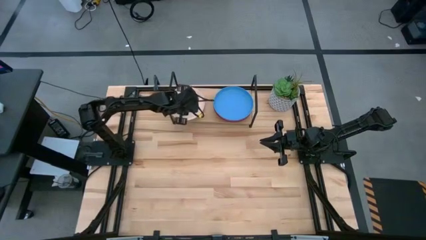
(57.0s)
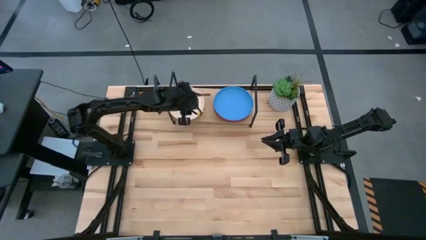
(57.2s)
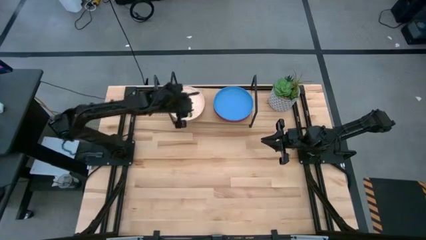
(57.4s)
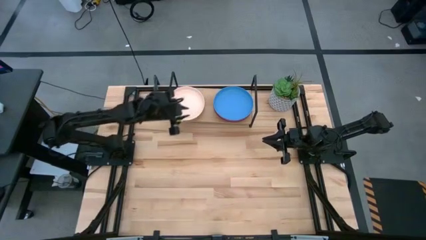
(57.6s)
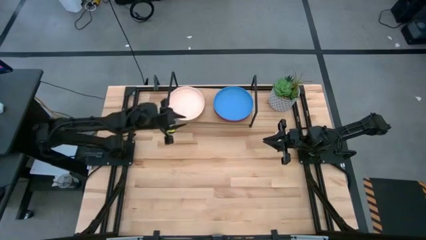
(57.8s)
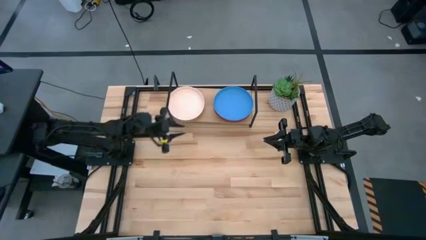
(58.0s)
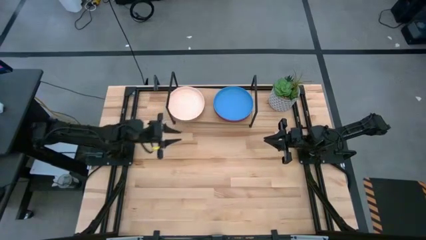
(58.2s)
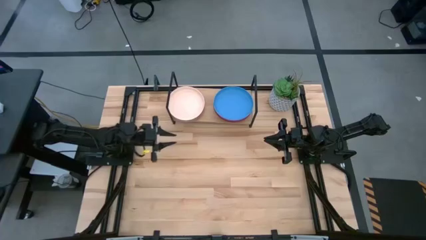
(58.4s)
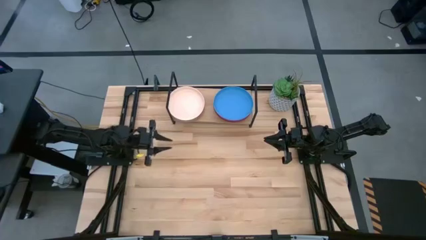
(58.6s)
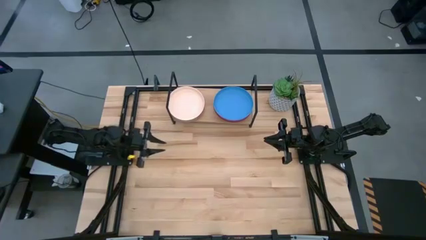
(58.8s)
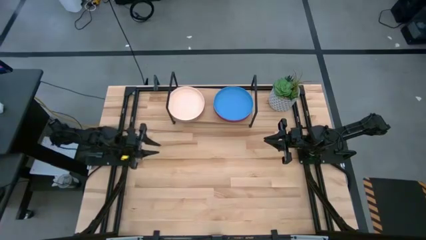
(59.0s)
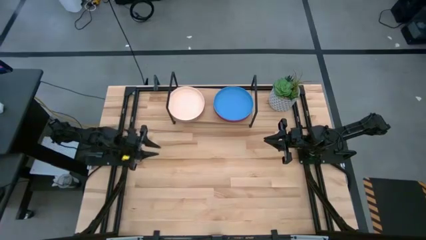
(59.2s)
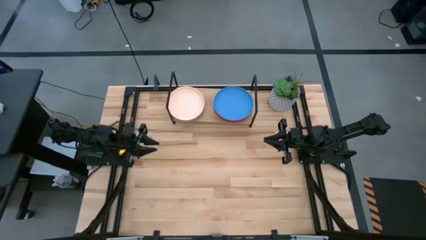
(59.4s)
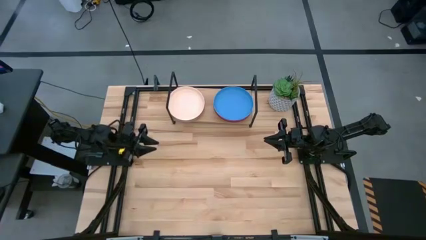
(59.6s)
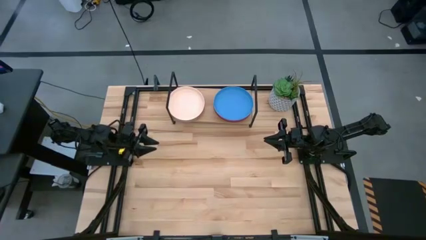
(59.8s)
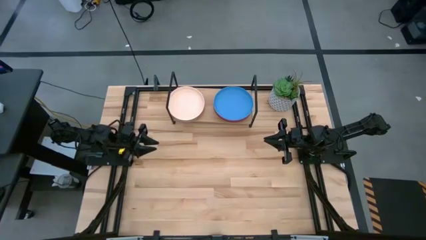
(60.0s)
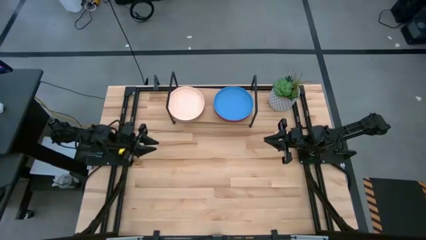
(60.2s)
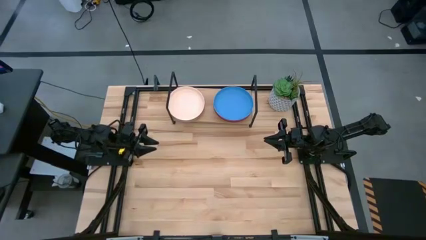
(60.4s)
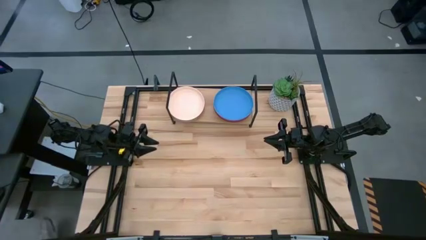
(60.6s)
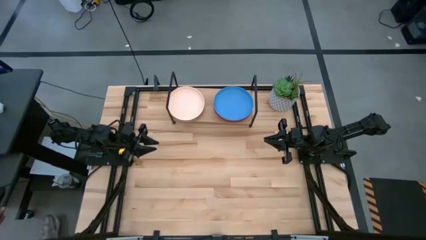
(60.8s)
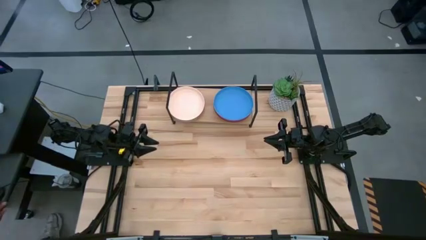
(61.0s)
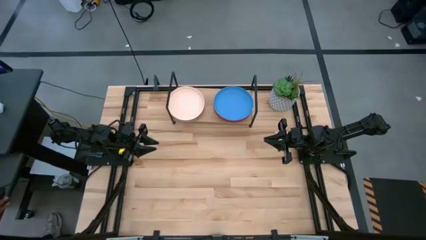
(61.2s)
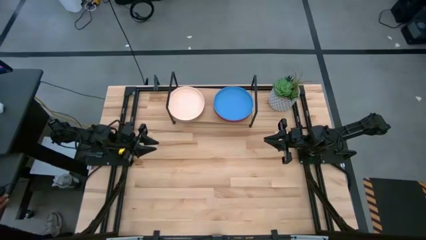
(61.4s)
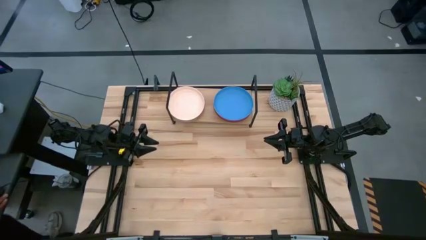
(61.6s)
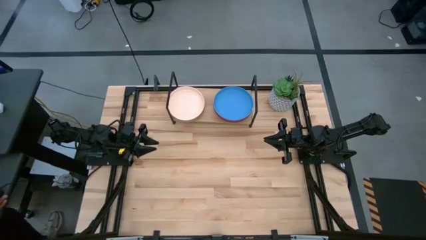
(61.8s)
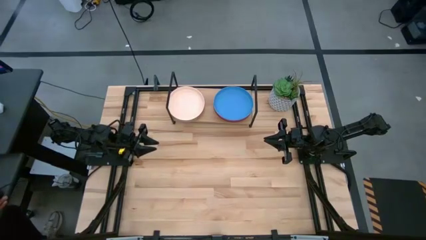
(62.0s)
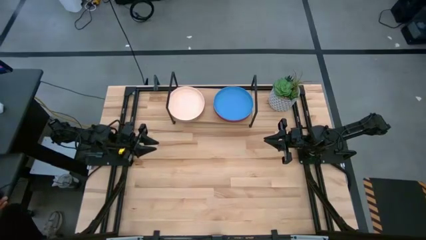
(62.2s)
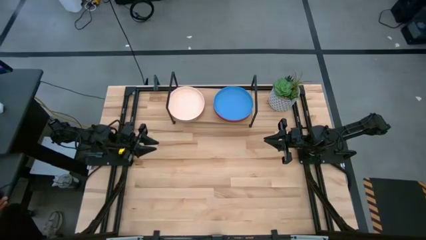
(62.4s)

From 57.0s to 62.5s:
Task: Place and stack plates onto a shelf
Return to Home Position

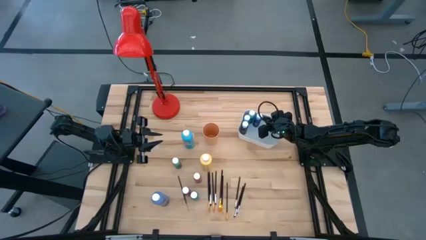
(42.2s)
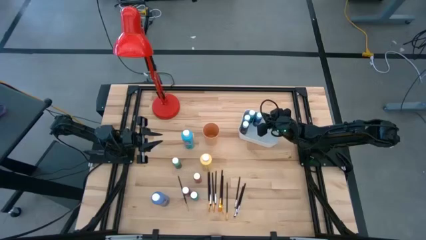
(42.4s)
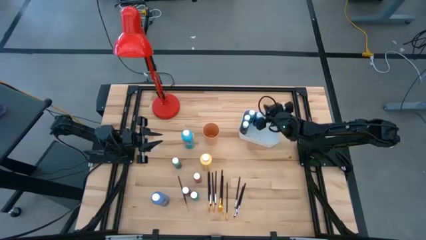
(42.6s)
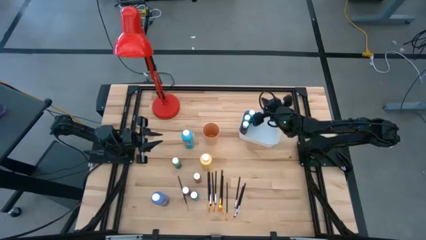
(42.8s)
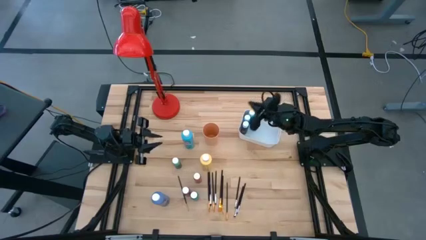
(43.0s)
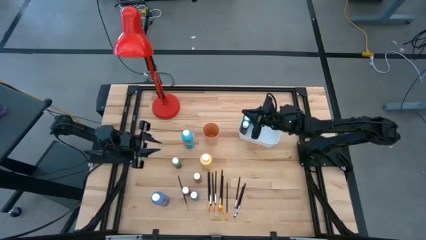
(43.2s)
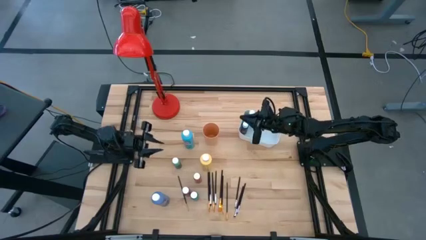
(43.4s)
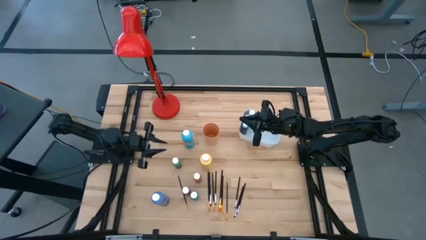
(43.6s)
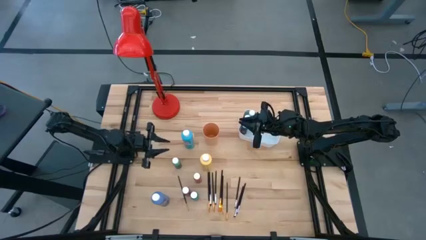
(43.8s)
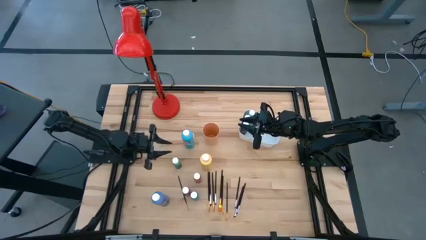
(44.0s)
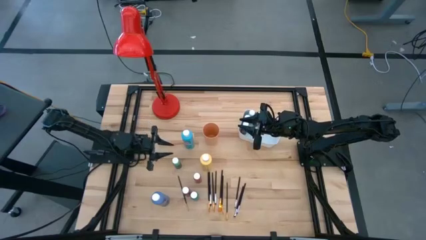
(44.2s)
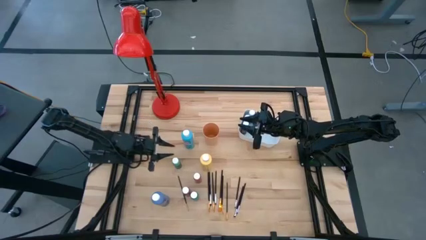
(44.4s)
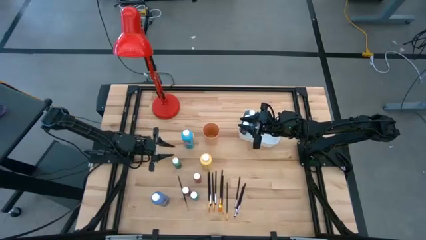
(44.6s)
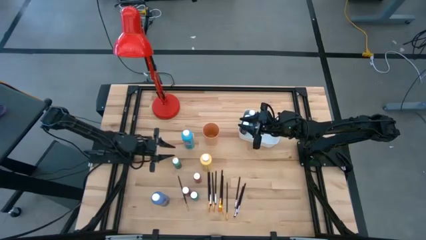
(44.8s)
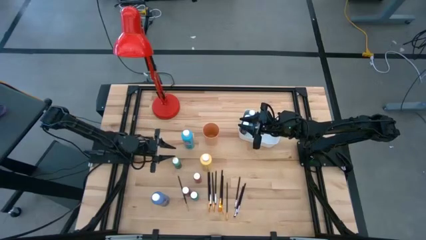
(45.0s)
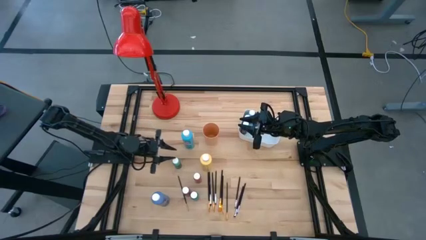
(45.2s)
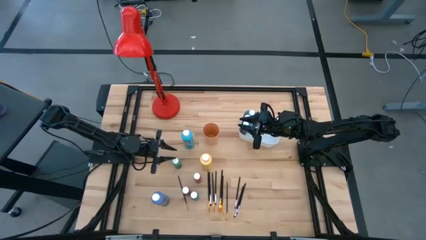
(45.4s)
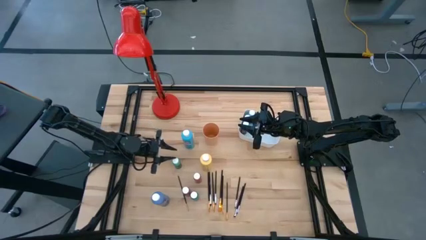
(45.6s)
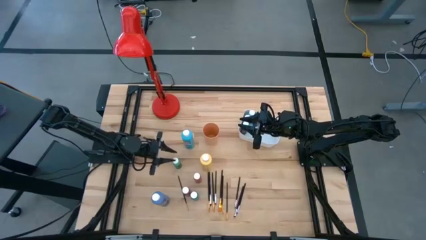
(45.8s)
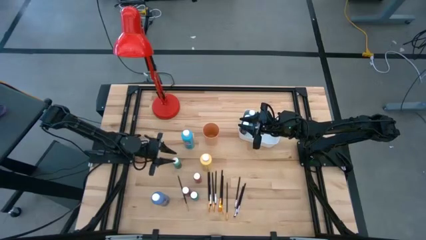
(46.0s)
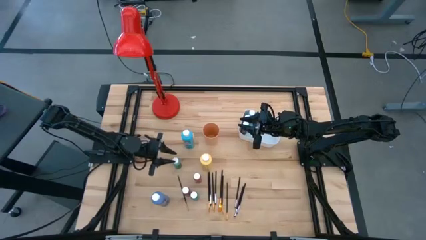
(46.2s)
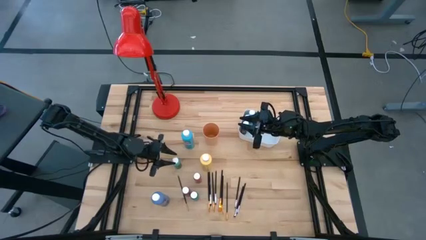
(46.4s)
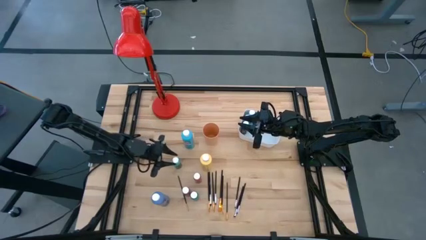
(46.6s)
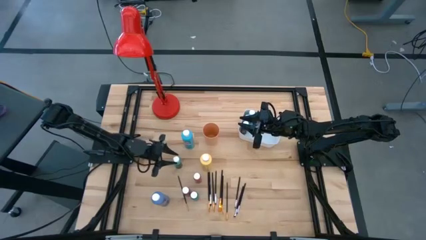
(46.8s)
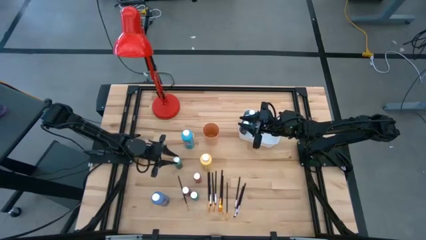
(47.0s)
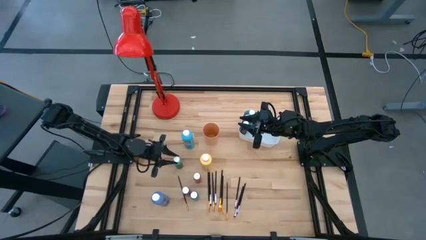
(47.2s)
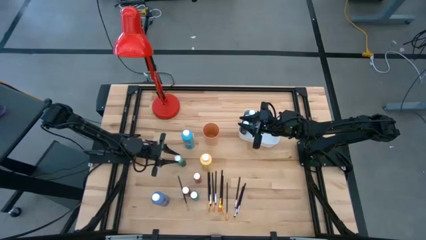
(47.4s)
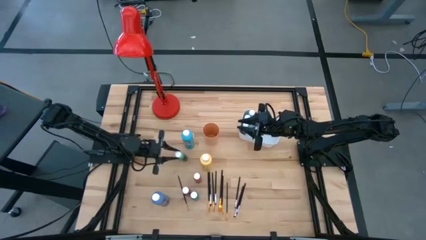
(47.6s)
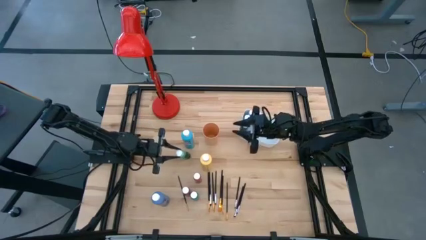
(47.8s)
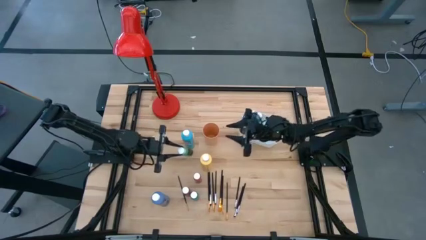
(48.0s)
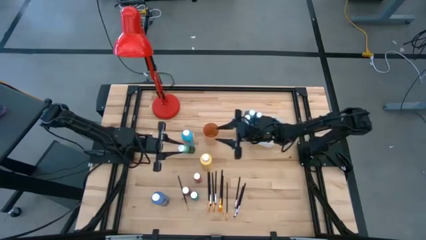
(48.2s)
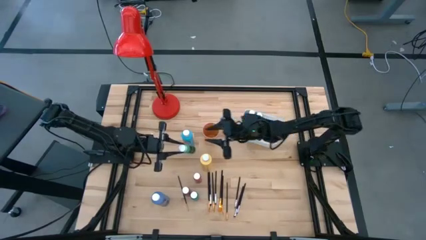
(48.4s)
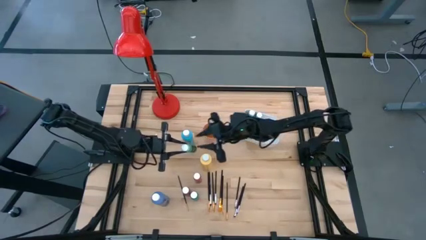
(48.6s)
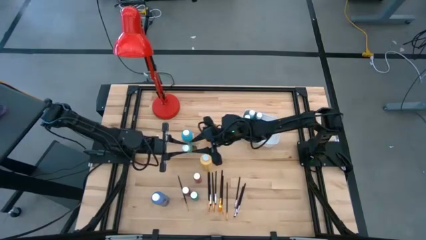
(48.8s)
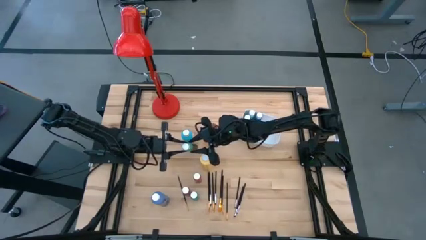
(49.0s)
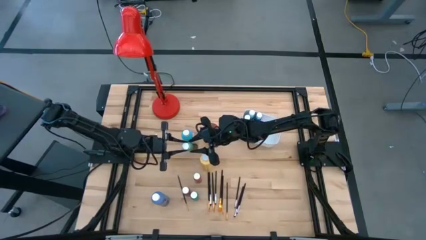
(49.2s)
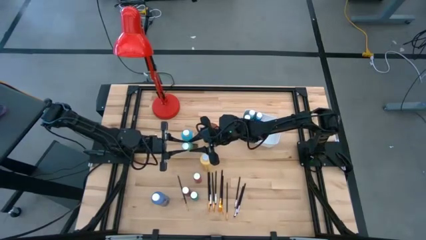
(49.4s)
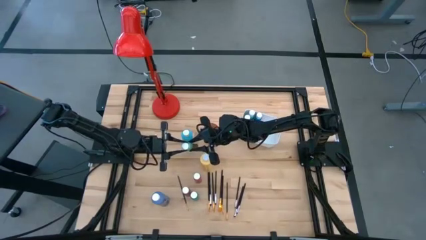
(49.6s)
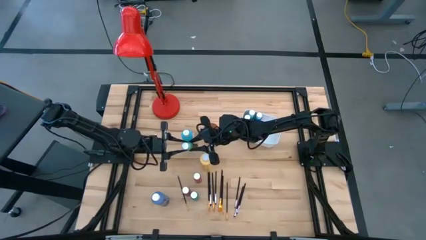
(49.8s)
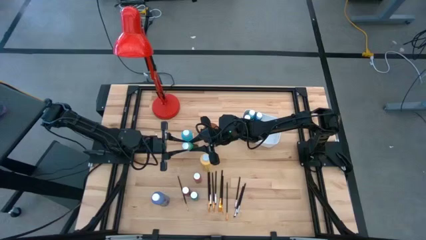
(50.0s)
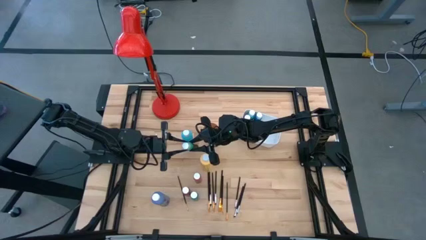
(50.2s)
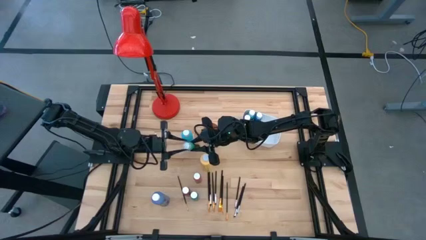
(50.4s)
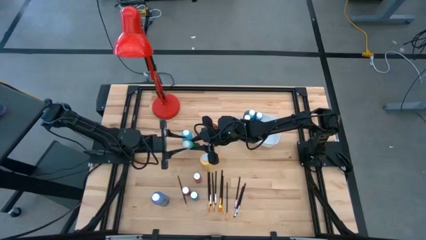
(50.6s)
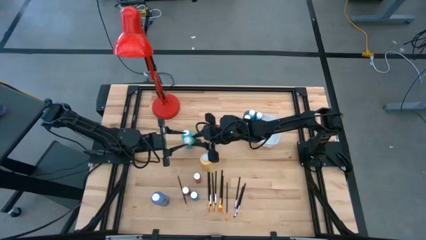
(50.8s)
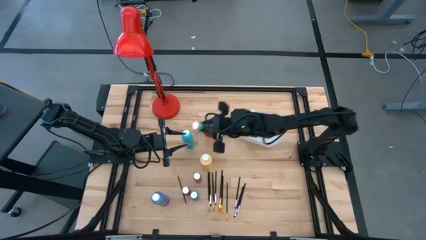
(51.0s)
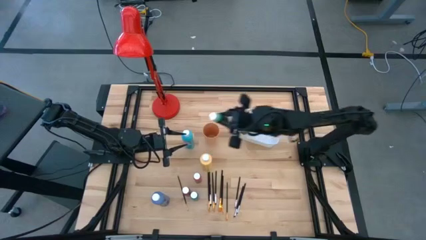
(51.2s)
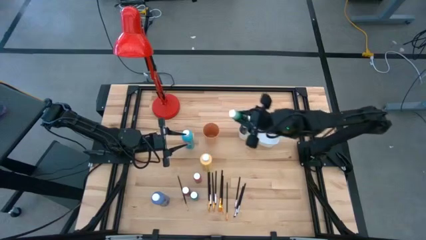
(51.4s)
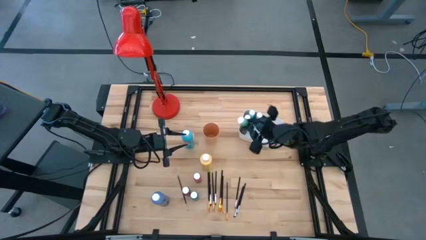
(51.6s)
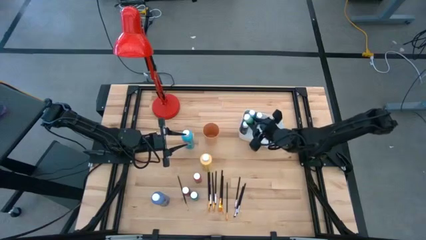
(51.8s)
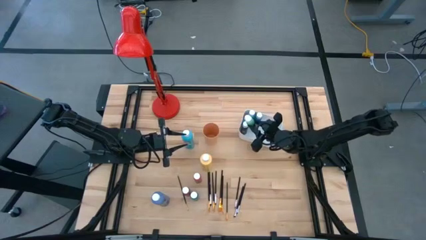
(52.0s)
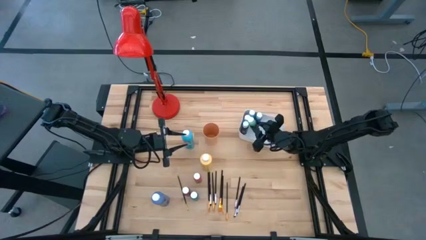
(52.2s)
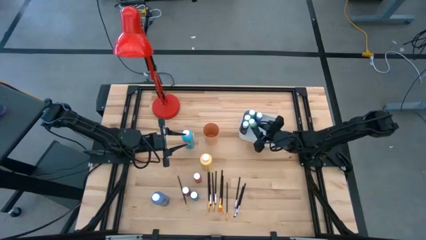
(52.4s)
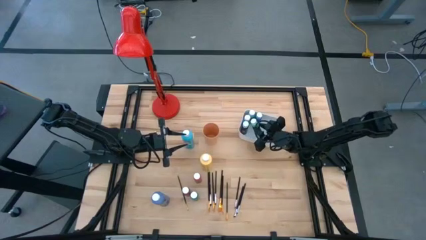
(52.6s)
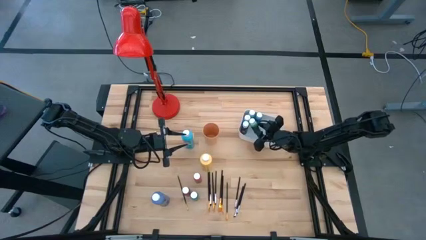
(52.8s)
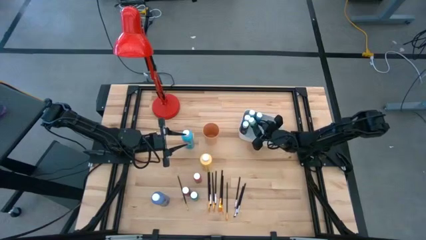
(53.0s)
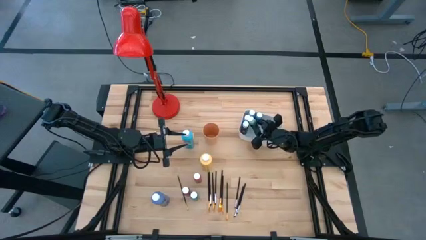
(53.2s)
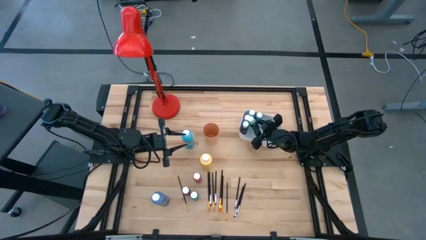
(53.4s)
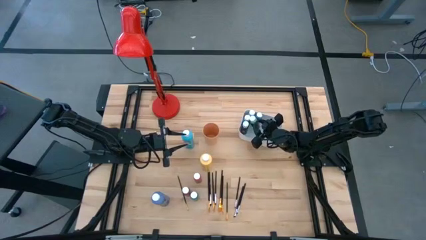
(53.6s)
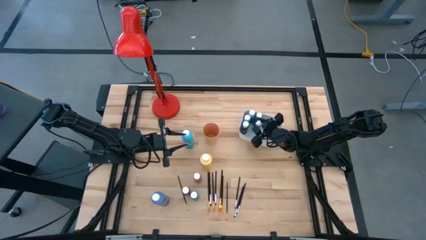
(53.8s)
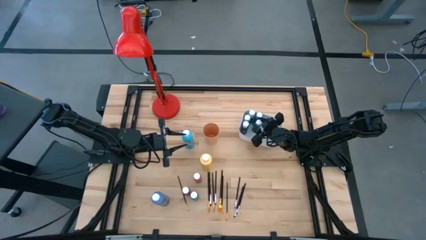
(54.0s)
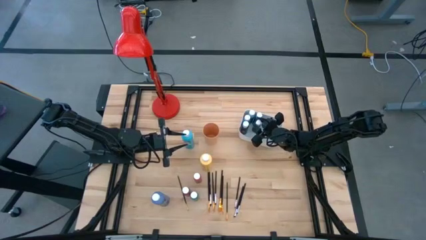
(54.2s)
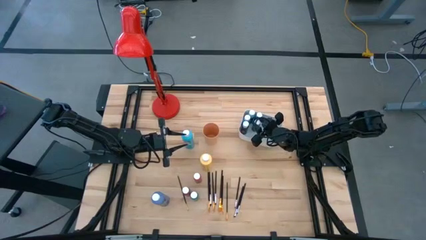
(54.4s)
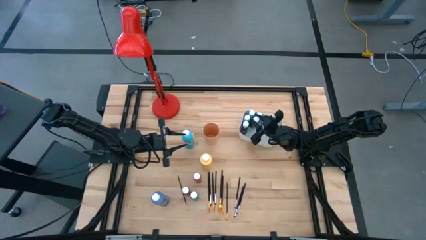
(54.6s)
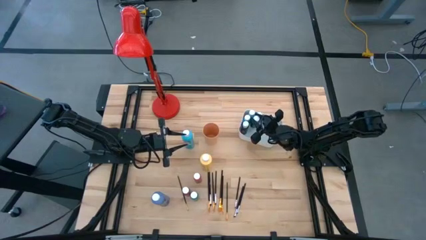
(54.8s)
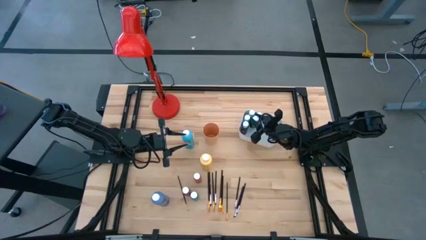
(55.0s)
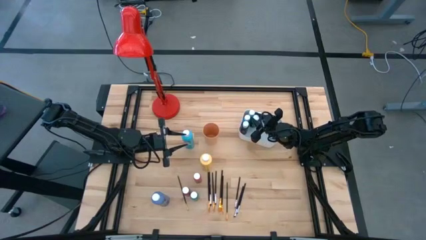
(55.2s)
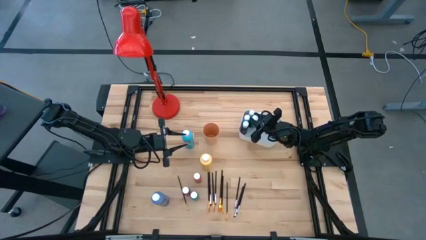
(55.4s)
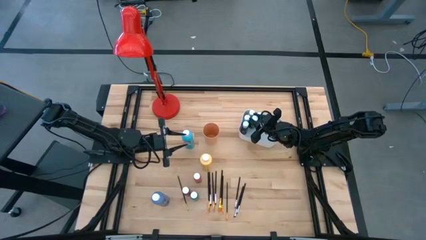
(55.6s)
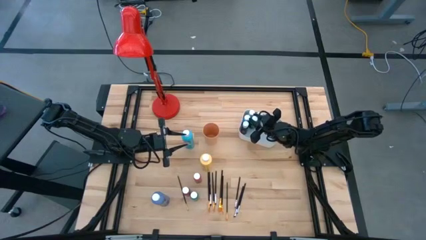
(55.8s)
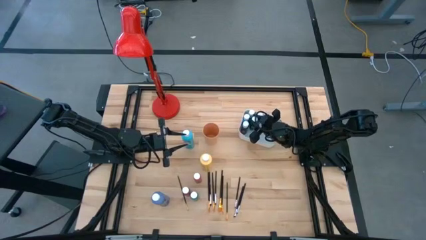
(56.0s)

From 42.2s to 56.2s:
Task: Pick & Place Paint Supplies
Put the top green paint bottle into the white bin
